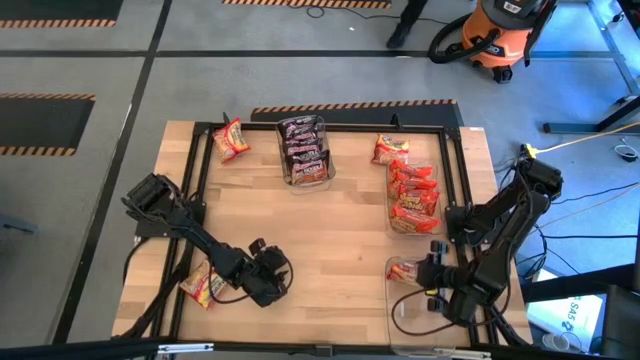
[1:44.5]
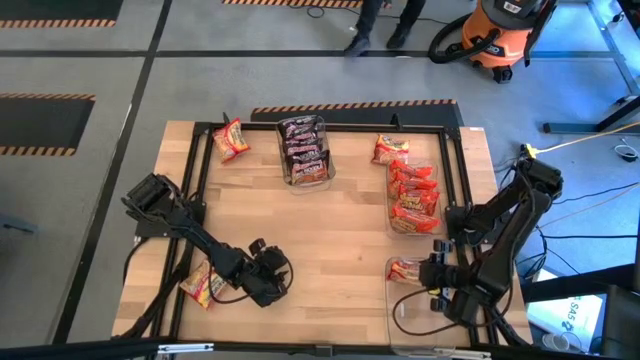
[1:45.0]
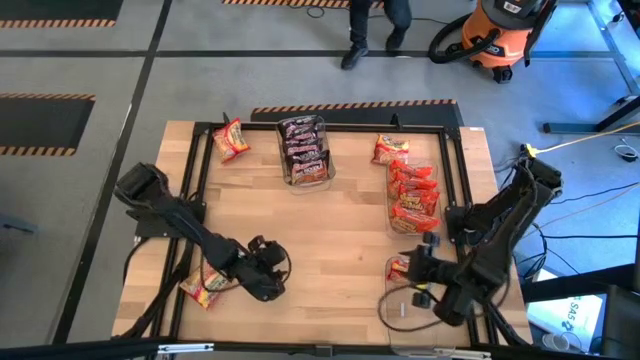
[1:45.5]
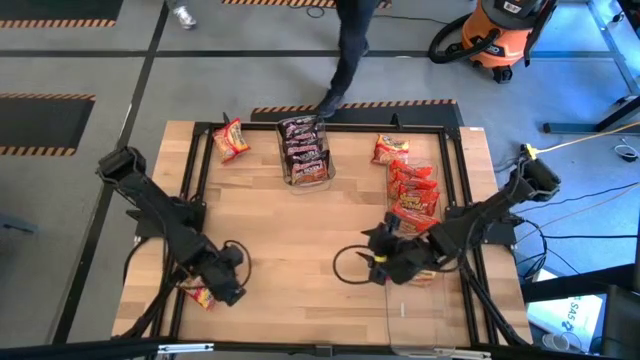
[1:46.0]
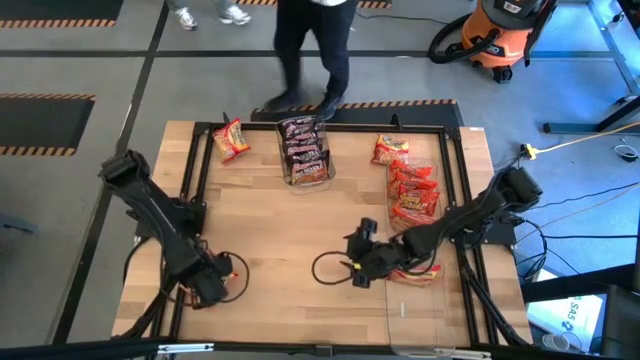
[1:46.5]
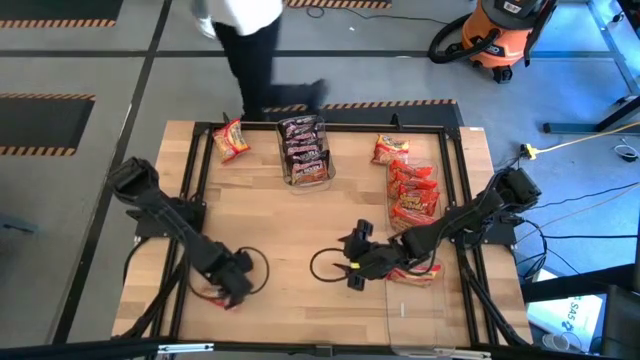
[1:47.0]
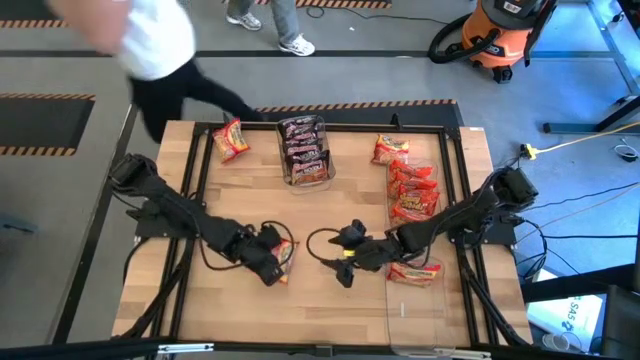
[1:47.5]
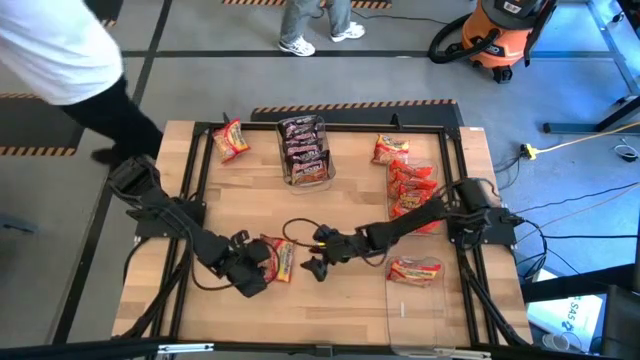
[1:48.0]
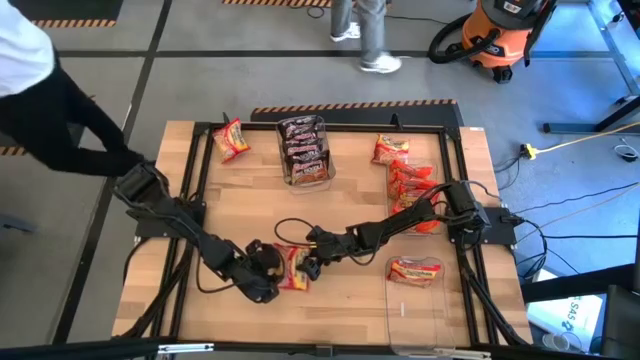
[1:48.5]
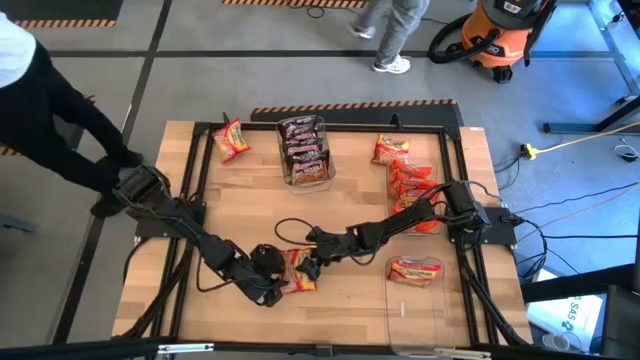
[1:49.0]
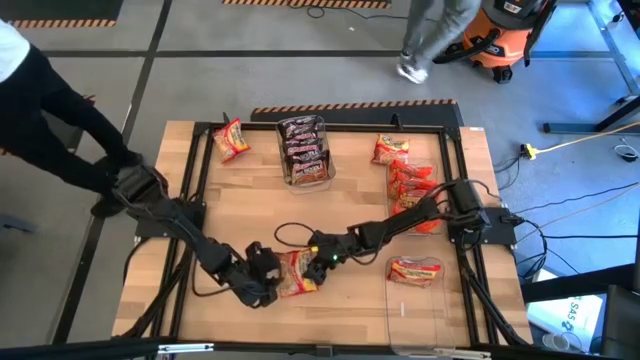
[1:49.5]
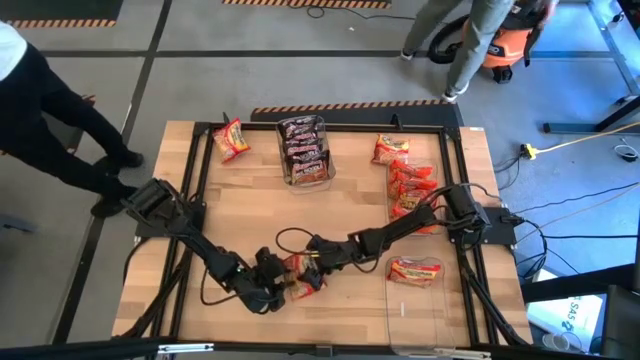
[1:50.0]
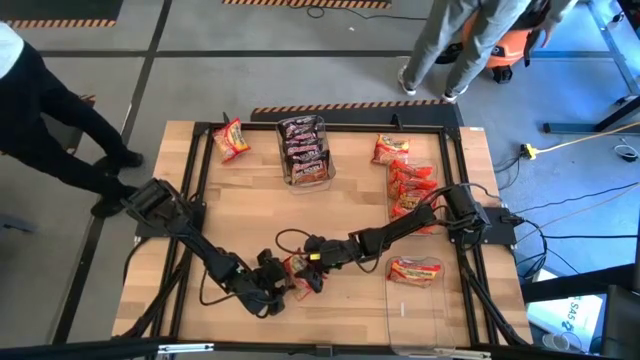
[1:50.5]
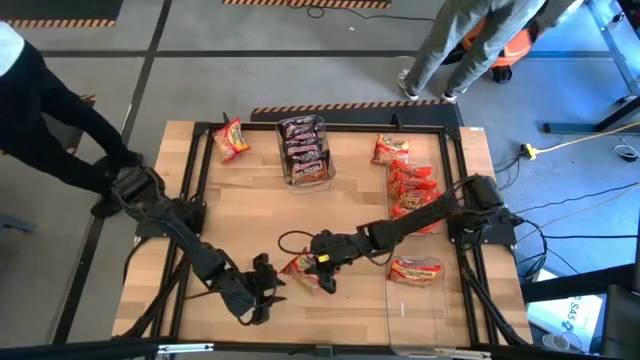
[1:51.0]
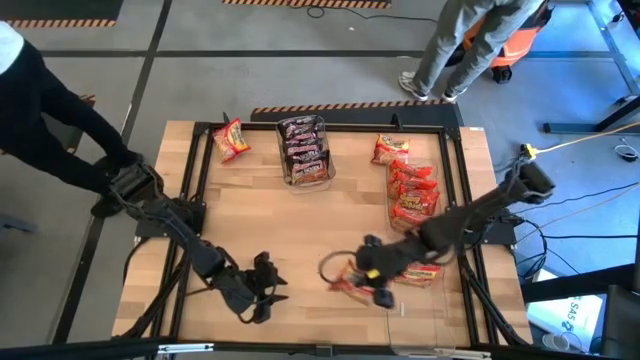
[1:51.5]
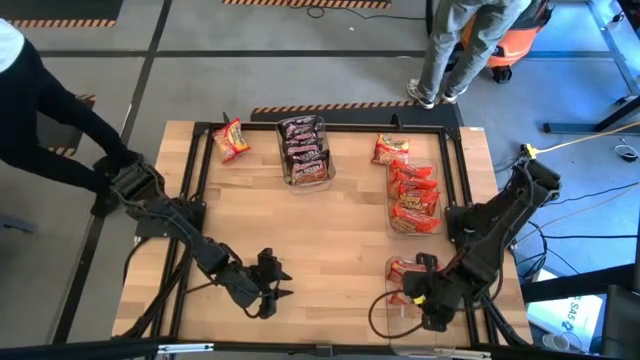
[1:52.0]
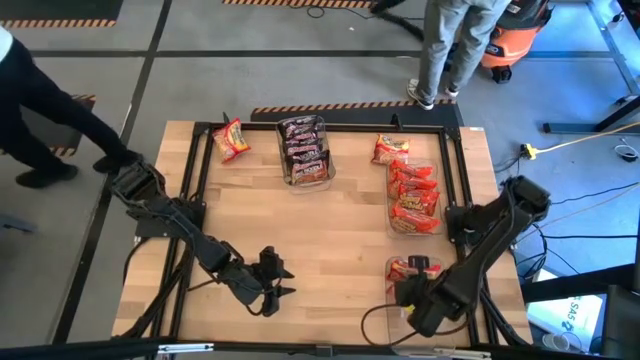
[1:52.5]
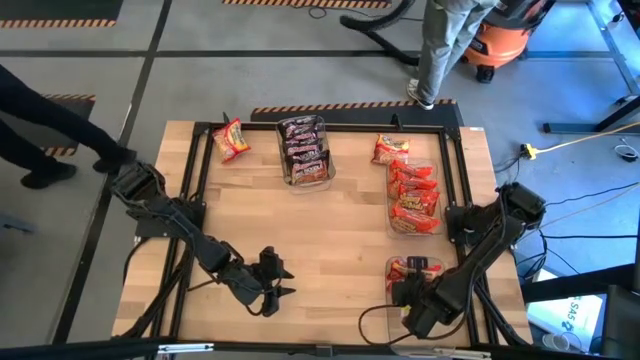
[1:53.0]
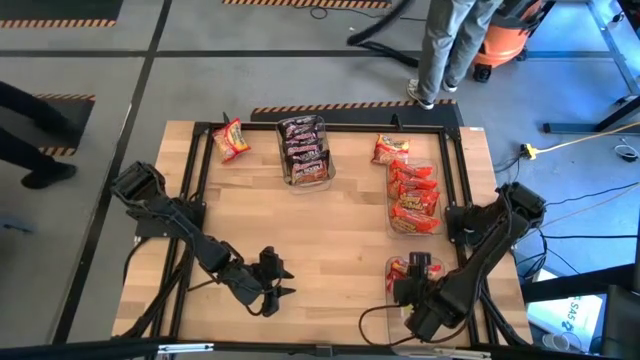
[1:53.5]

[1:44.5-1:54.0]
Task: Sort Maruchan noodles
Put the red noodle pack into the bottom transparent bin

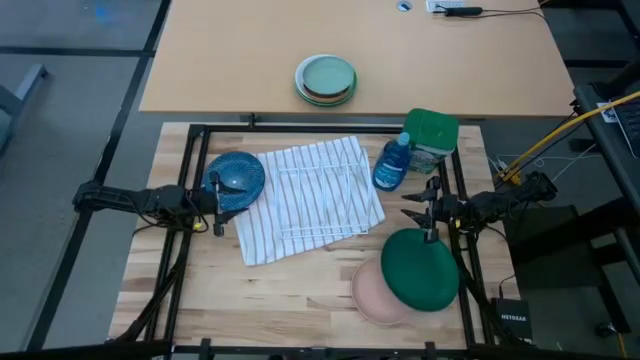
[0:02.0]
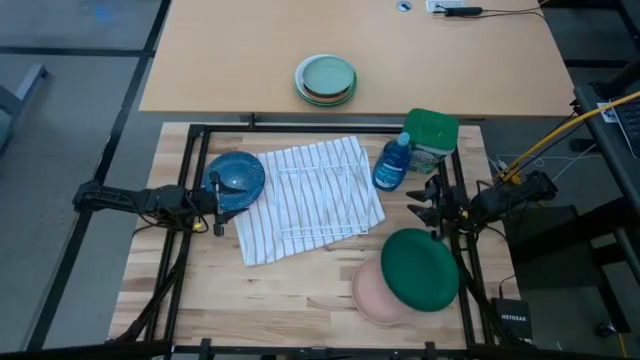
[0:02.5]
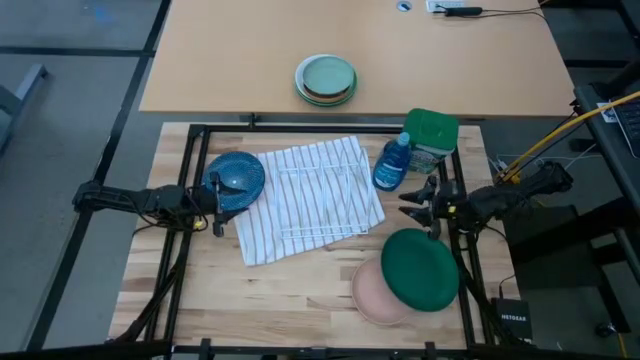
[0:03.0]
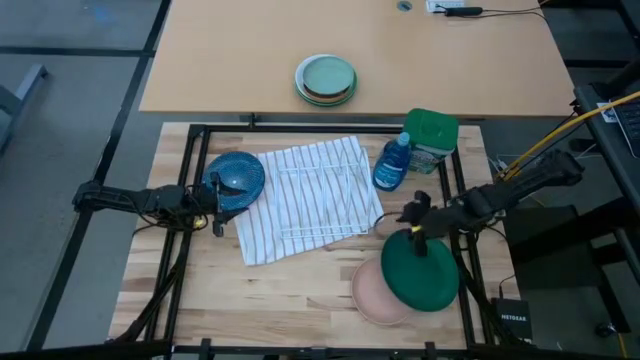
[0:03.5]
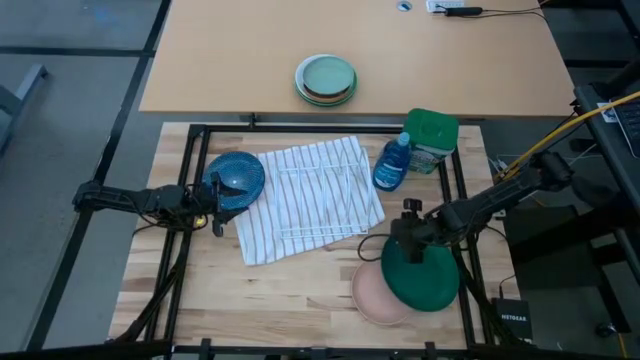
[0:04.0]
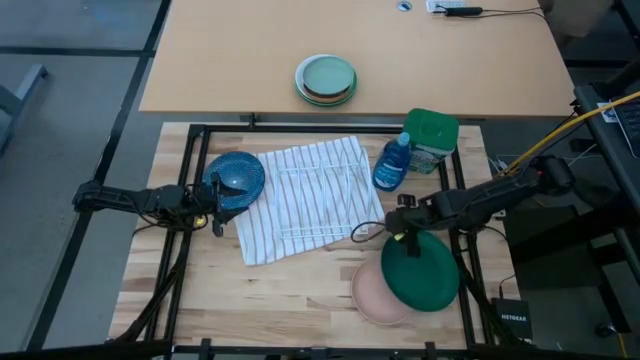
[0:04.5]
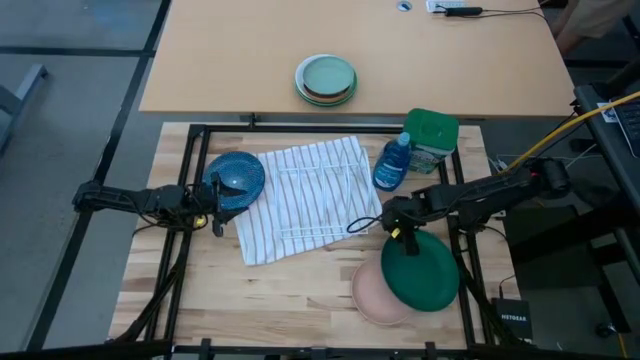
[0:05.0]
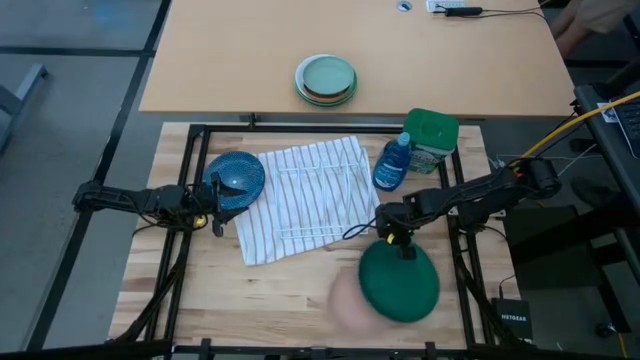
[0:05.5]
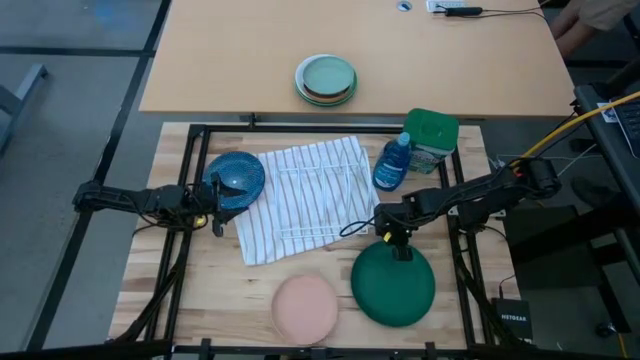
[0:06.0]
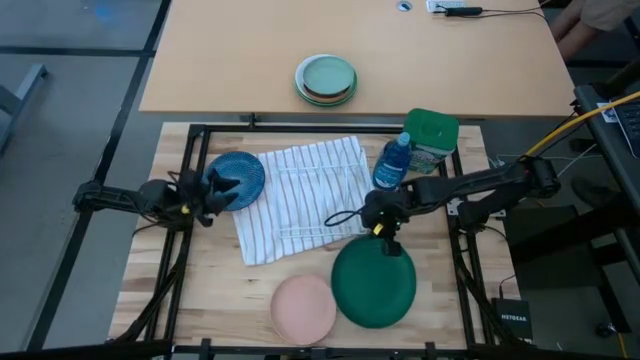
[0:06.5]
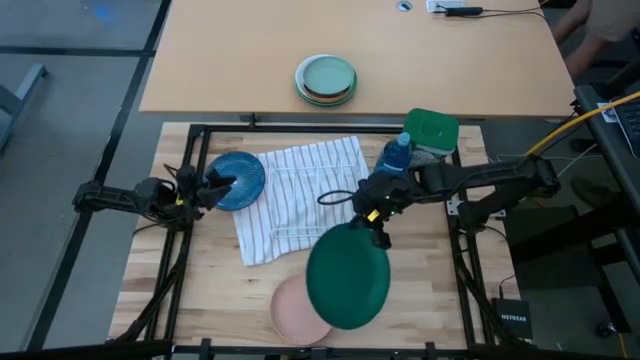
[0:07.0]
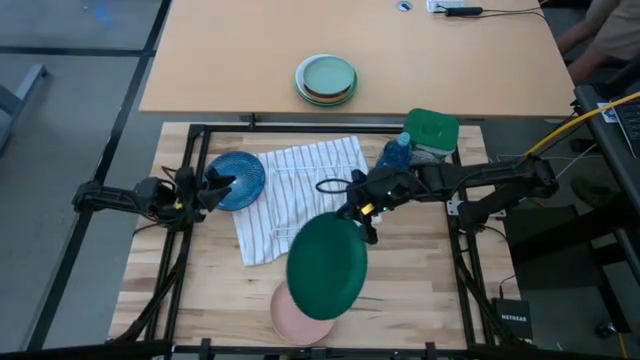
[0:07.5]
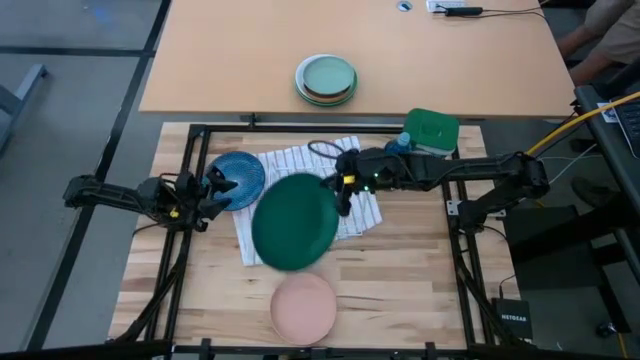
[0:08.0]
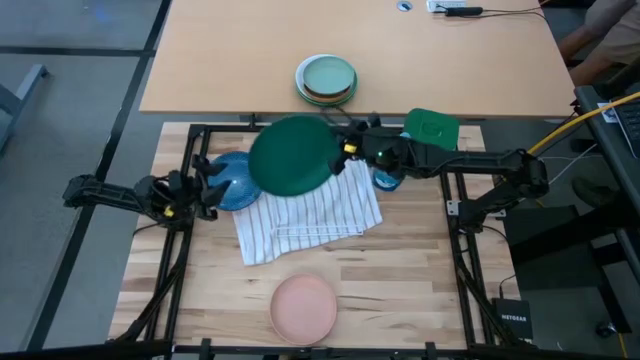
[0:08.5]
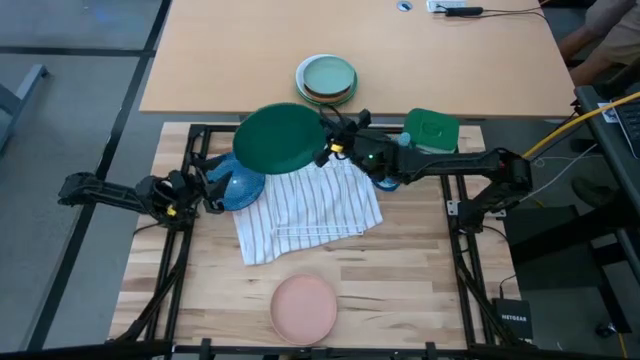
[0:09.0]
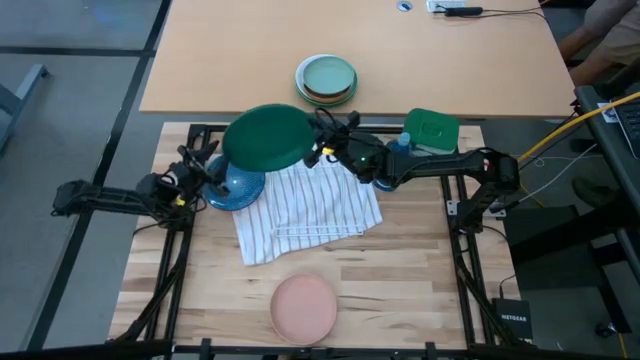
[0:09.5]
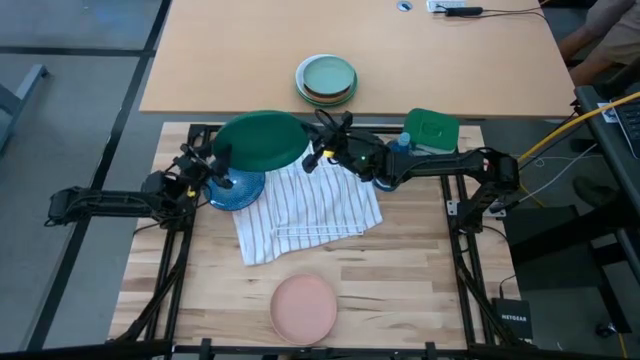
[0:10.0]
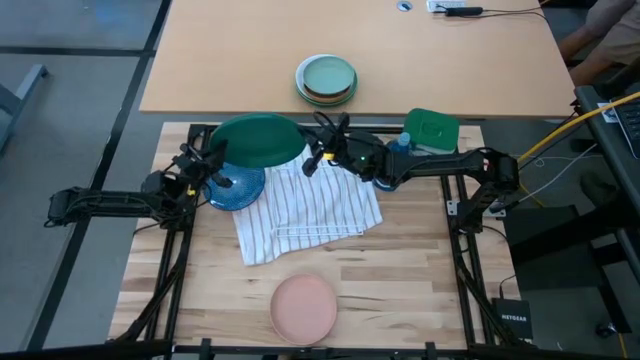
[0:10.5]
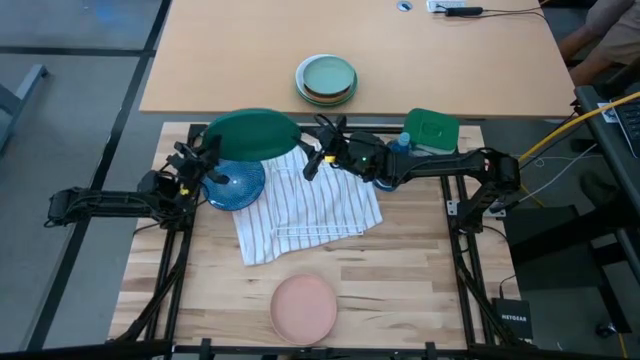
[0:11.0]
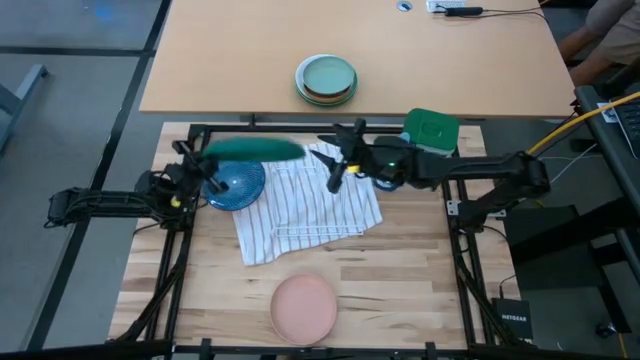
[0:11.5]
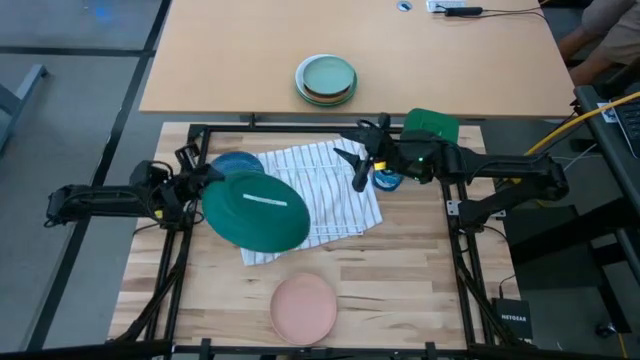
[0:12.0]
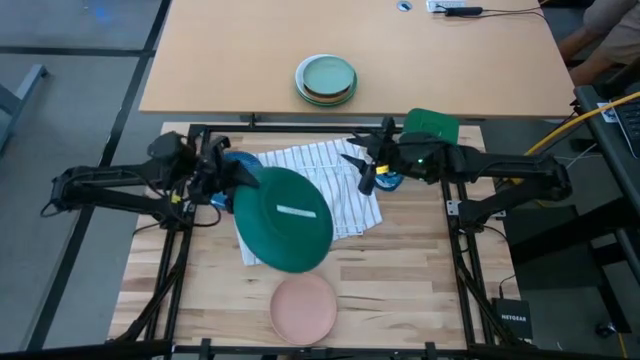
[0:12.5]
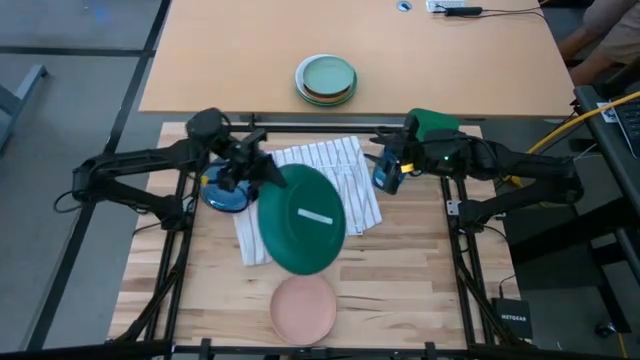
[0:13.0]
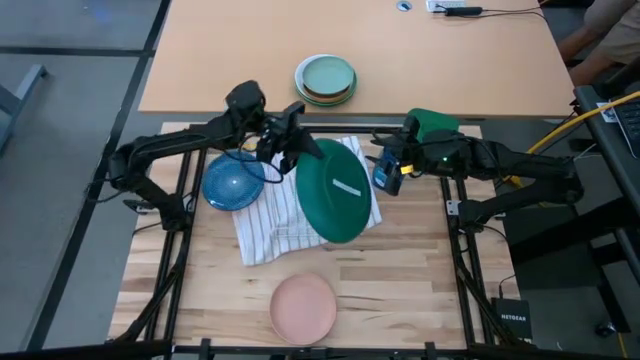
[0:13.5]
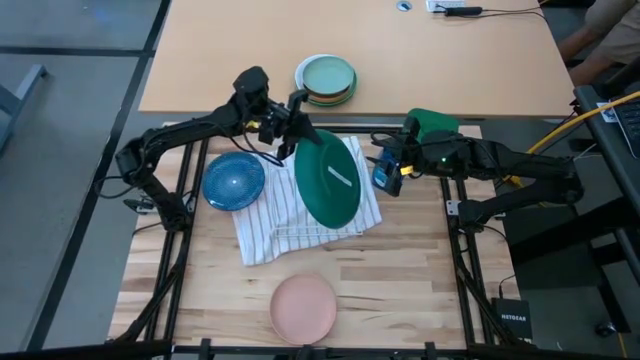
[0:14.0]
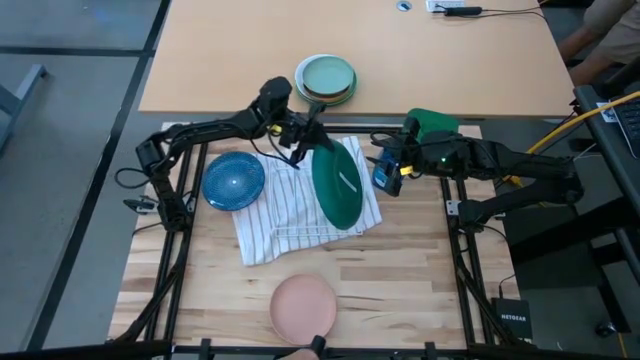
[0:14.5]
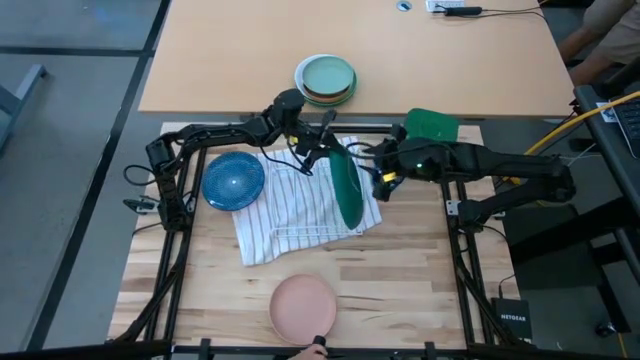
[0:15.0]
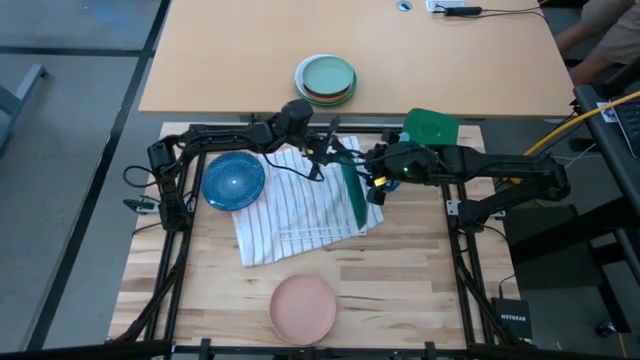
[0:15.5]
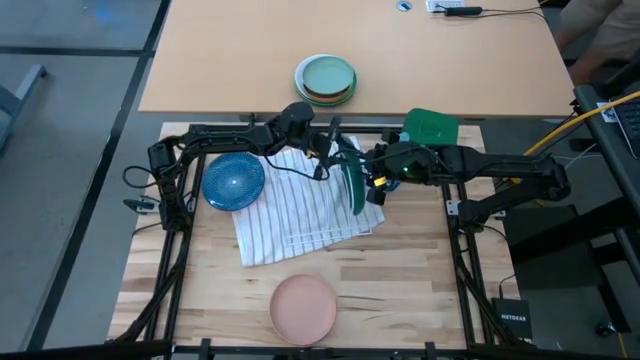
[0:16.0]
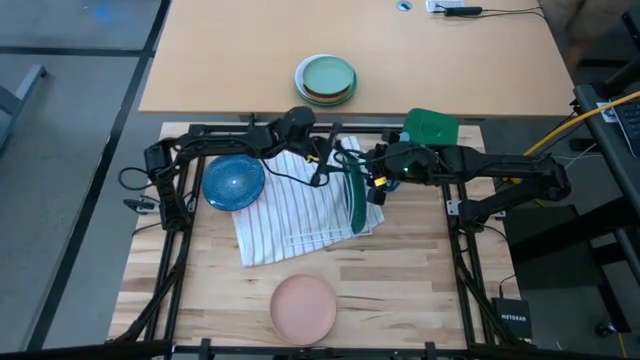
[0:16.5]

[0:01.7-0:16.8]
Task: Sort dishes
Put the green plate in the dish rack
